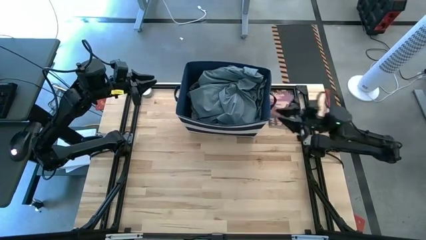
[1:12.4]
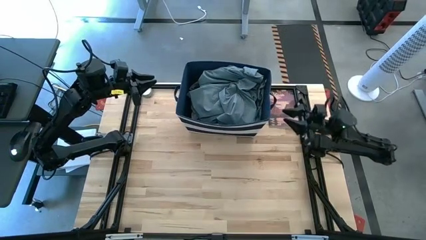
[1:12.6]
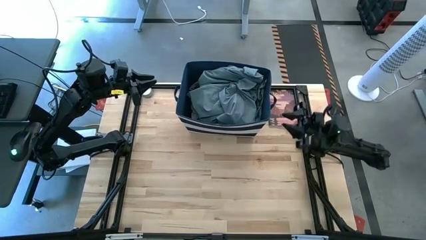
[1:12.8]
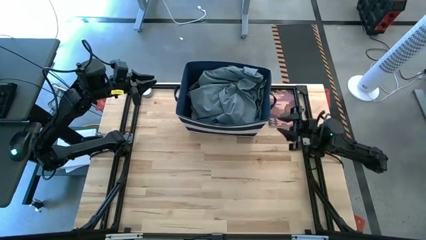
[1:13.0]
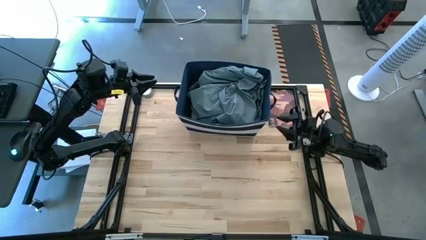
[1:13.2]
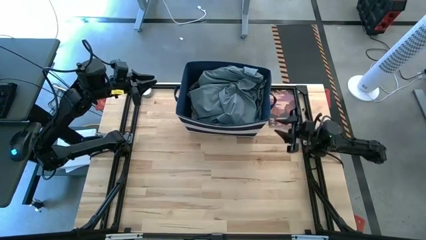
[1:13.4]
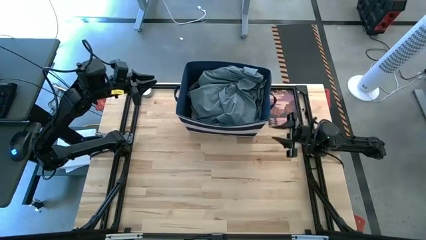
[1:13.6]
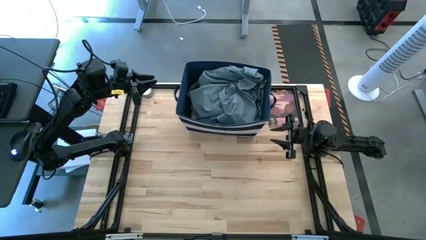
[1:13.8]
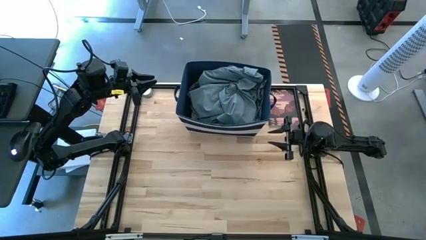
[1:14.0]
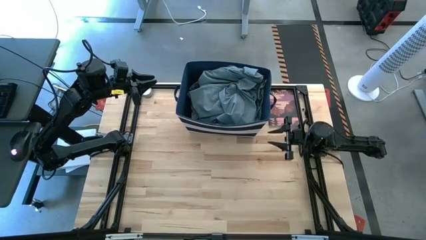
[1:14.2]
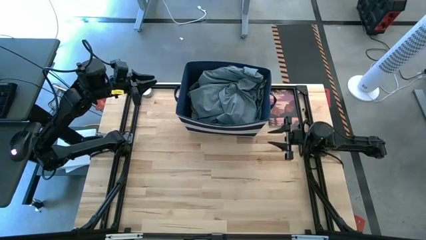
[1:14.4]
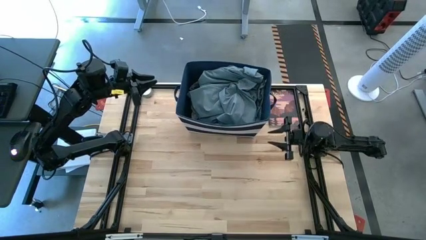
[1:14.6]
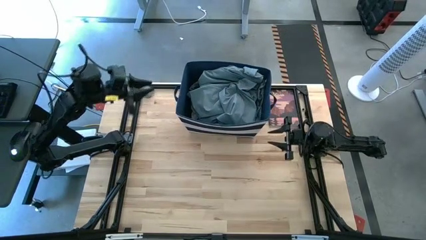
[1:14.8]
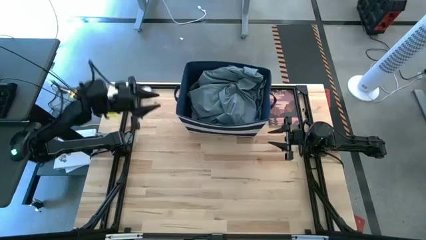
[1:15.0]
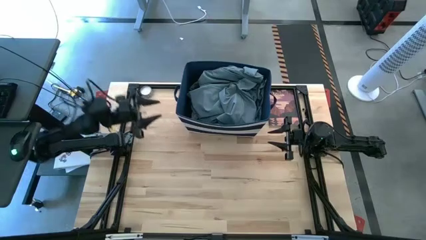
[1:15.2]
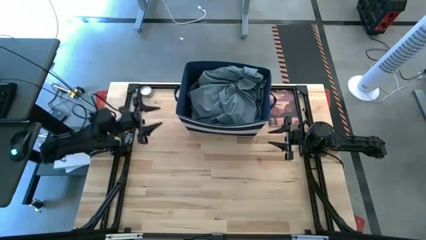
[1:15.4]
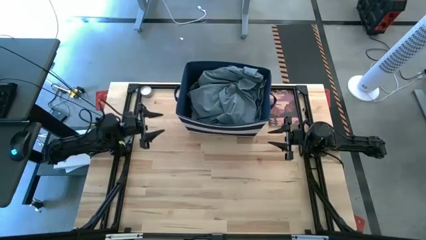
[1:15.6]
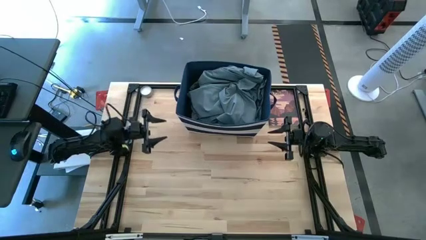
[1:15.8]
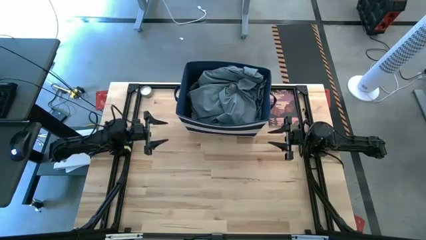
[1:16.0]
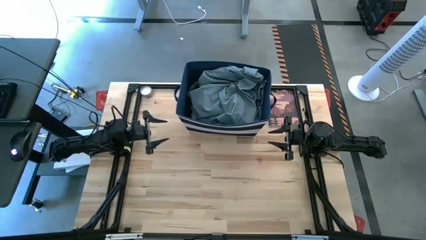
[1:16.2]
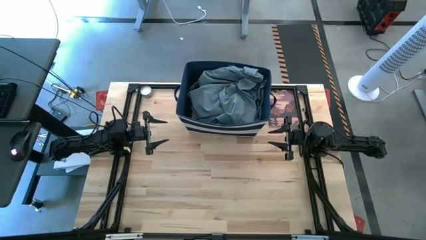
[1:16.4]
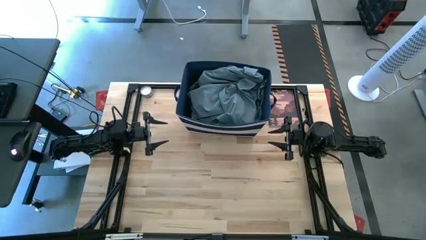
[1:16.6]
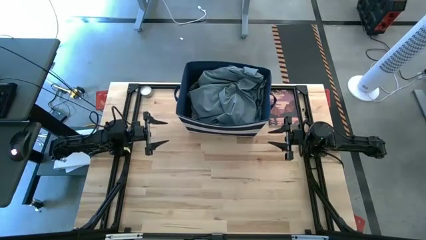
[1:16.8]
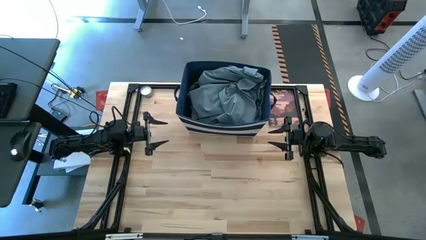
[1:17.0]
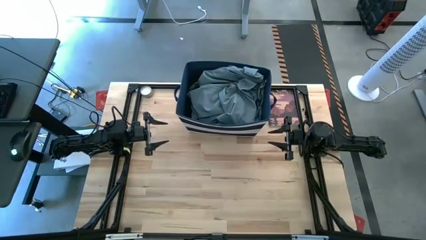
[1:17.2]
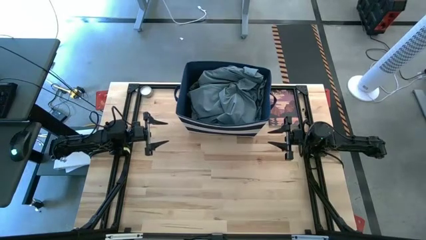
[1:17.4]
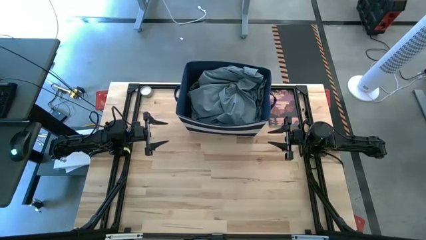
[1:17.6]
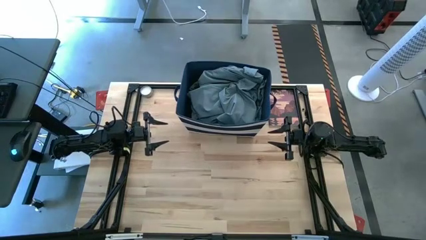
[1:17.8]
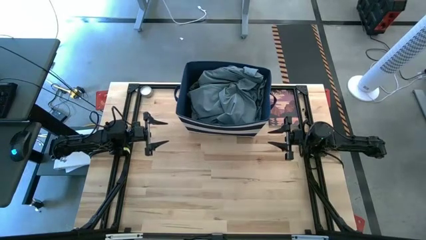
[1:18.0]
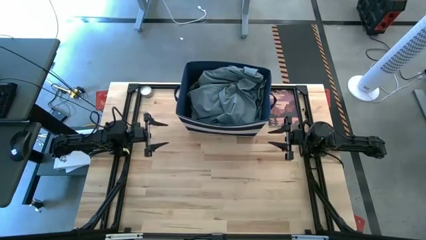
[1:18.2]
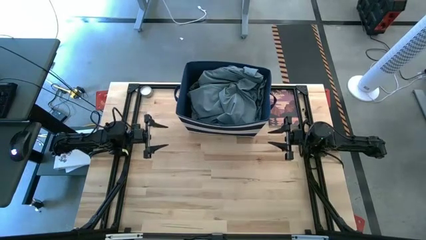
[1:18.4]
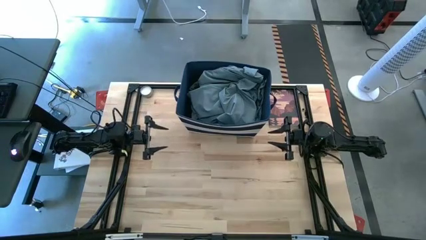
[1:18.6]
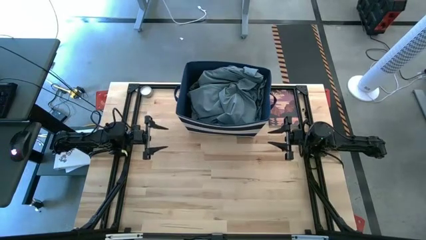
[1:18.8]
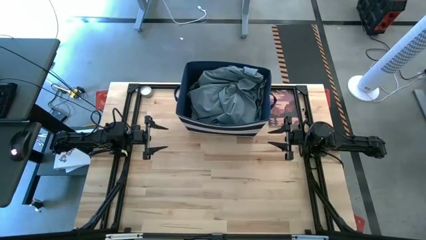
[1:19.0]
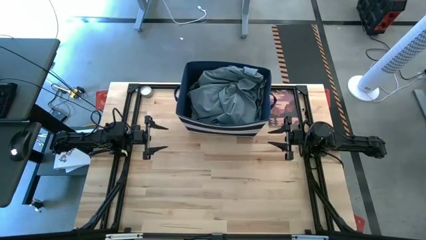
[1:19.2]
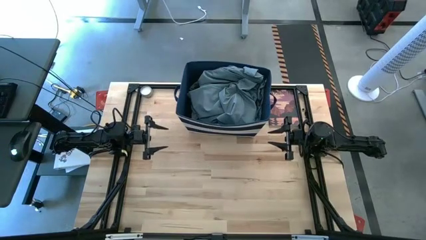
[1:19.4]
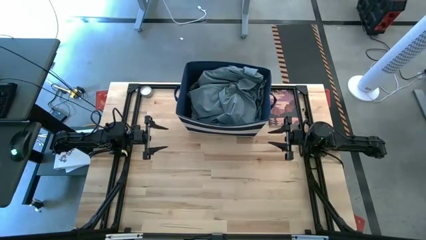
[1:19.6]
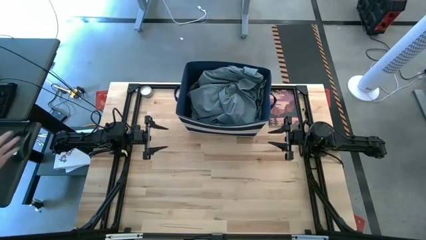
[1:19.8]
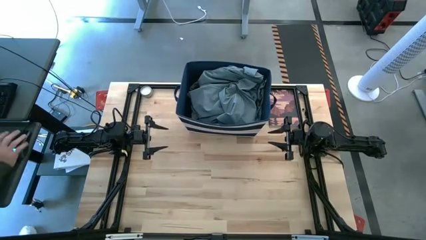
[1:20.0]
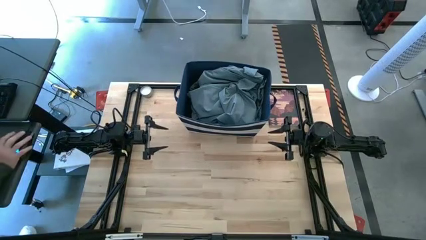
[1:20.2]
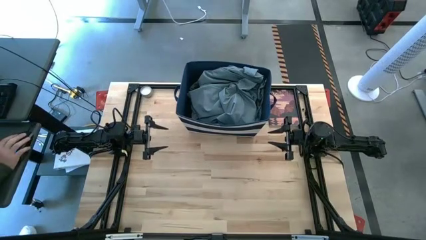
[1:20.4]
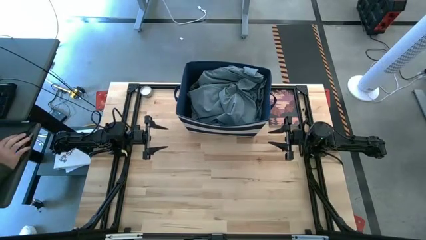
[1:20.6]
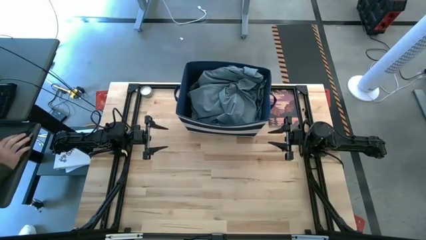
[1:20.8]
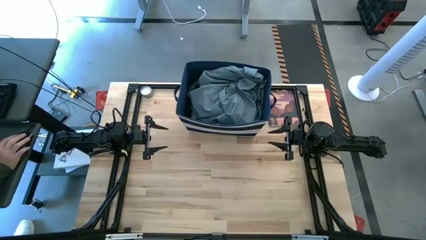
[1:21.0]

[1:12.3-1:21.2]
Task: Sort clothes
Return to Home Position

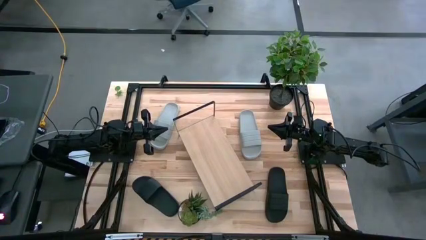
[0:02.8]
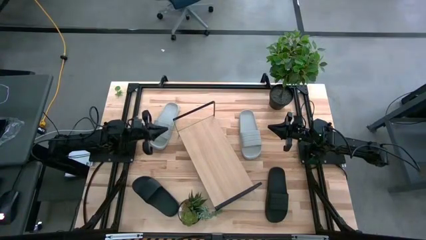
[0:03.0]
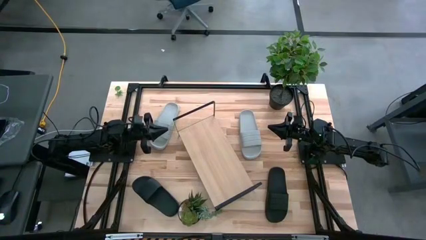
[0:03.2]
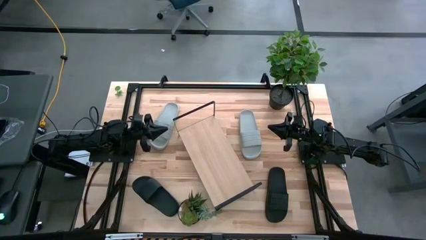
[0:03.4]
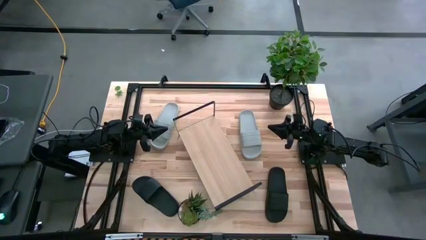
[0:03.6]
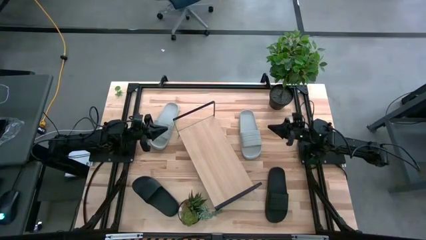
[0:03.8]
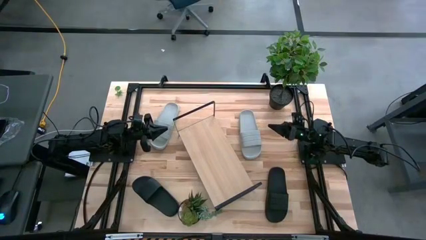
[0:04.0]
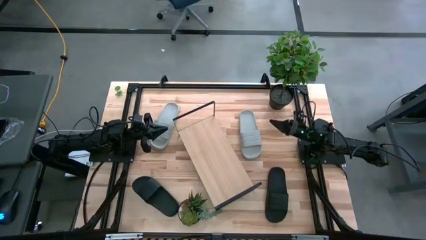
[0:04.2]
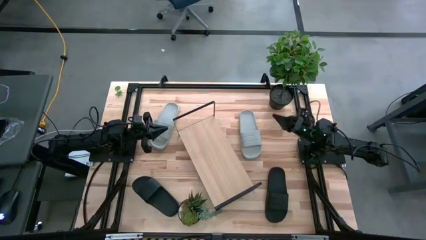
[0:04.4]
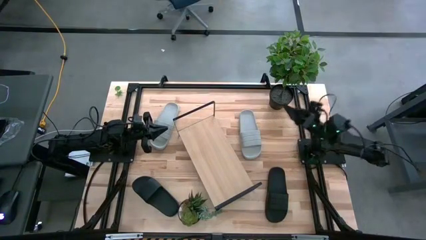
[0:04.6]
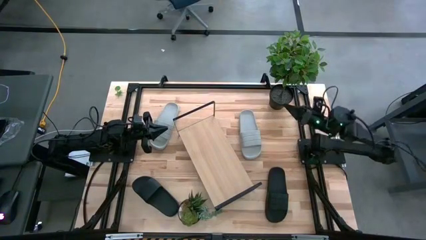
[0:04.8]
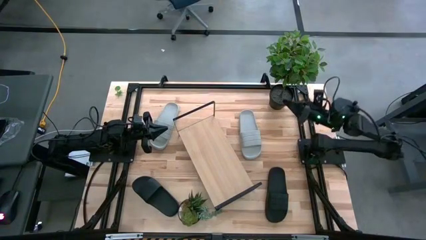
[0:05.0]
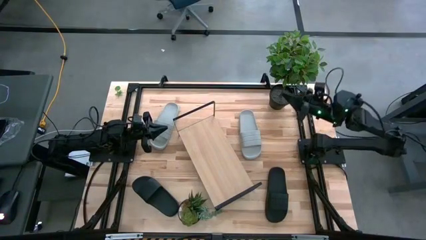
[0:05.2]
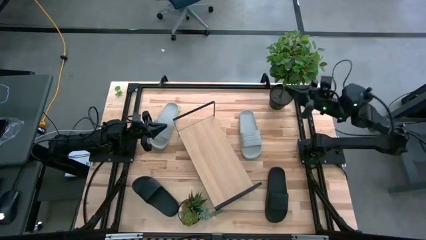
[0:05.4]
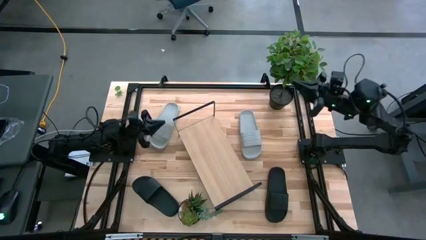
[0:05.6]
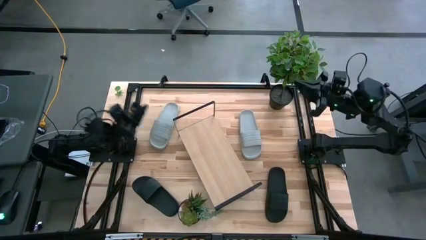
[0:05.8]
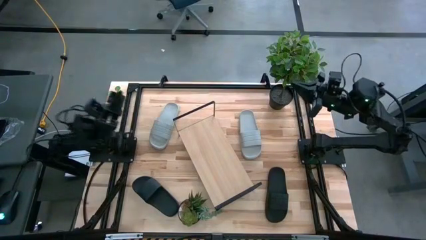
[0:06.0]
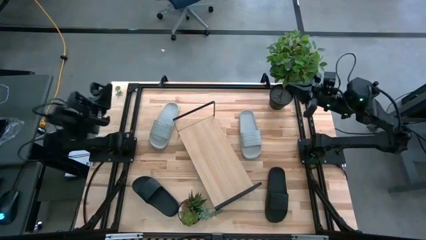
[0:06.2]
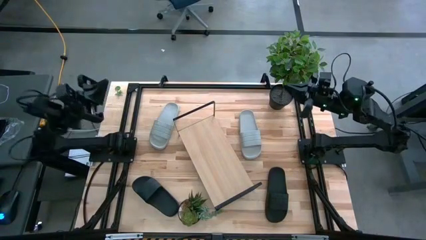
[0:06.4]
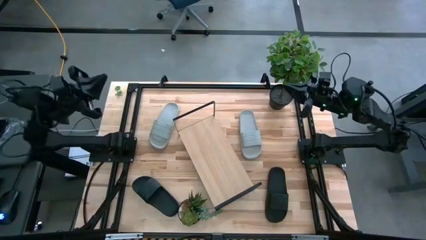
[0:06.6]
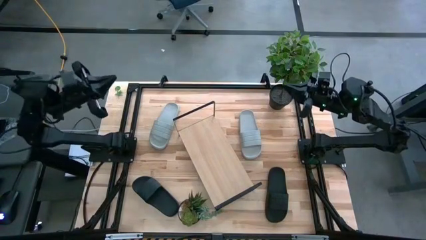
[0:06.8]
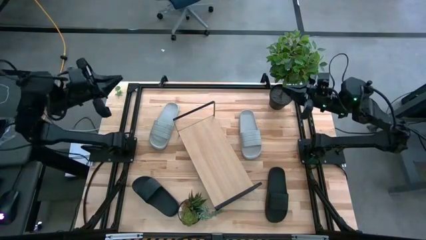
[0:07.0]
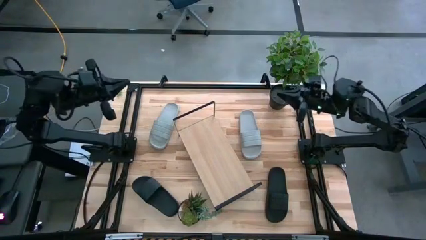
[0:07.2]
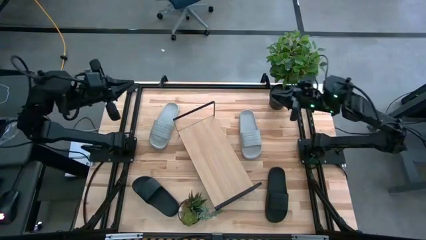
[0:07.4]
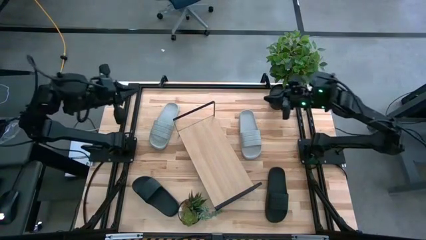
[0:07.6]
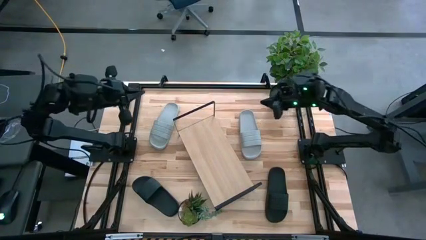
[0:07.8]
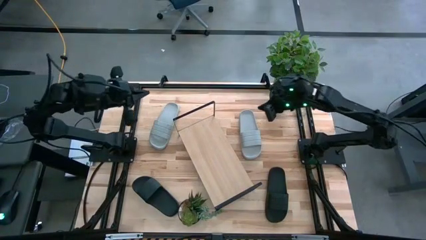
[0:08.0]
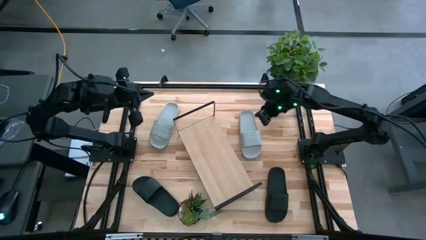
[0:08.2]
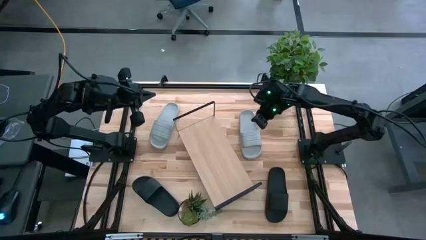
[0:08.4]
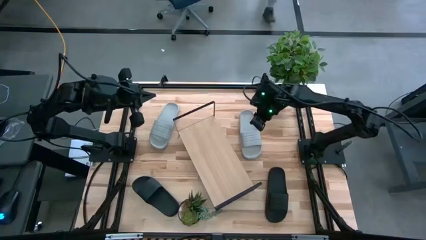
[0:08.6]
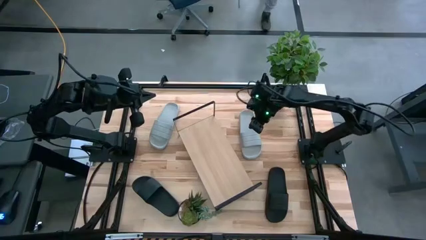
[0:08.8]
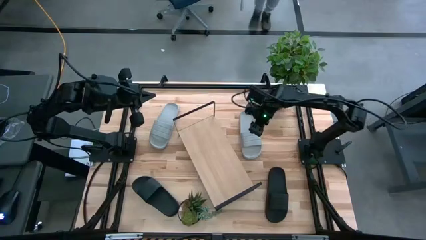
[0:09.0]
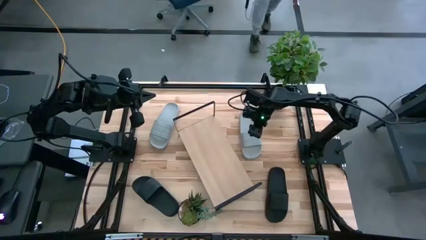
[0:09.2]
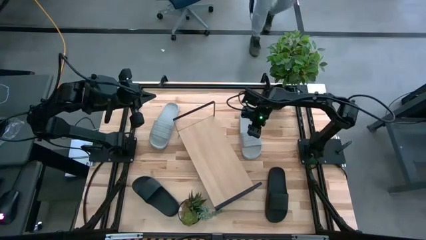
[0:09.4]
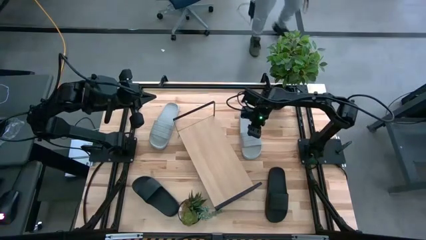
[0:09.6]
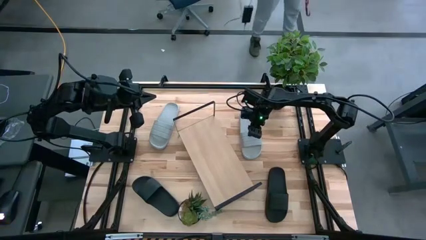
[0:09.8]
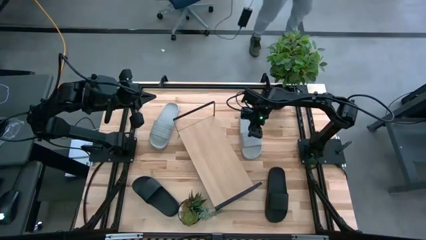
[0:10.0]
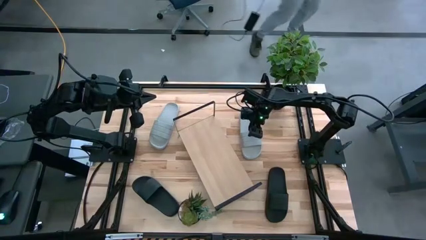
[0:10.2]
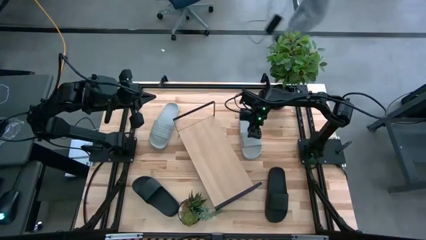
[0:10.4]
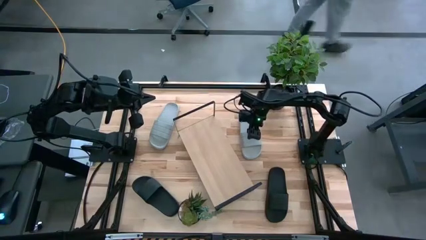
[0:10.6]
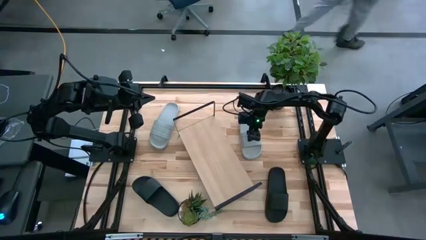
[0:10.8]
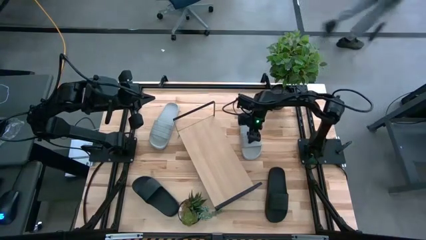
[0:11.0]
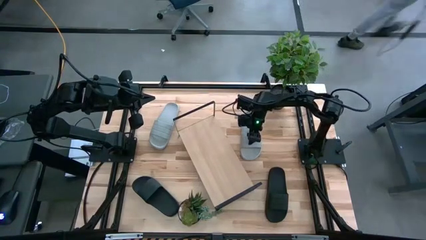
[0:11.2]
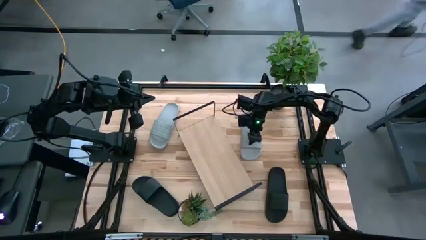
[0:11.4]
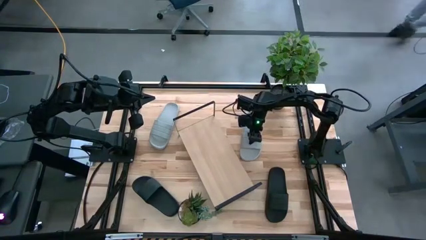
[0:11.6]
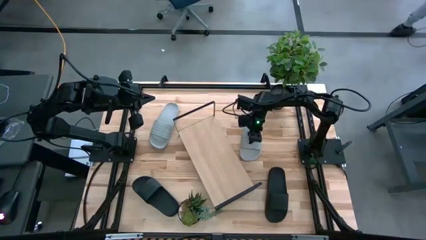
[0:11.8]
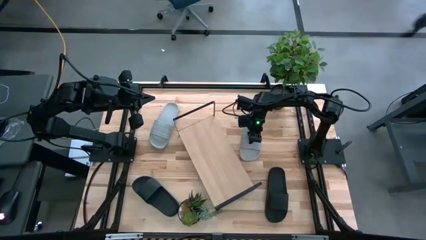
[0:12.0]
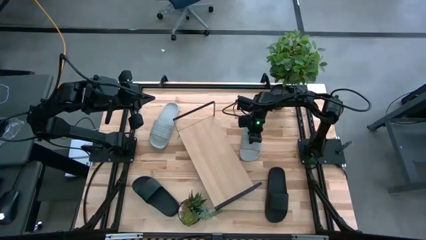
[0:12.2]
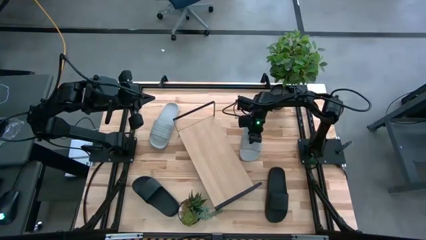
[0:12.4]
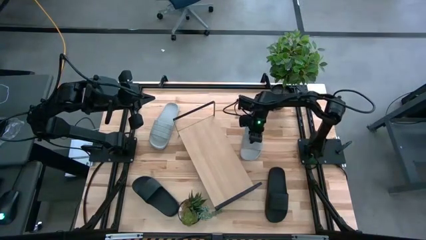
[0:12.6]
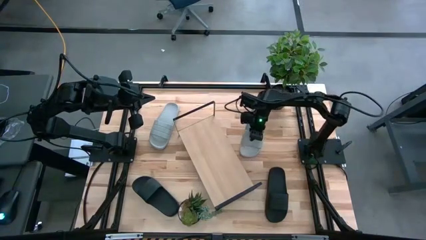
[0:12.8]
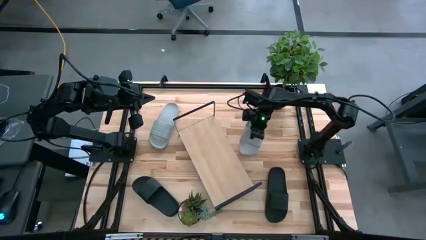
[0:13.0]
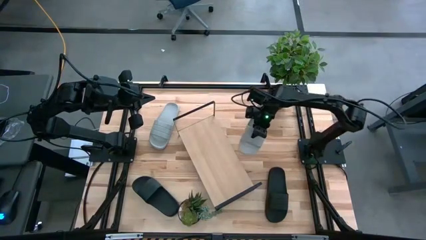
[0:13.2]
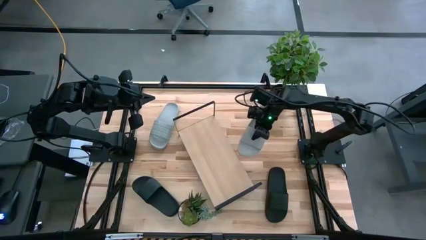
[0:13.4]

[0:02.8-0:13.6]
Task: Pick and place slides into the shelf
Put the right grey slipper on the shelf
